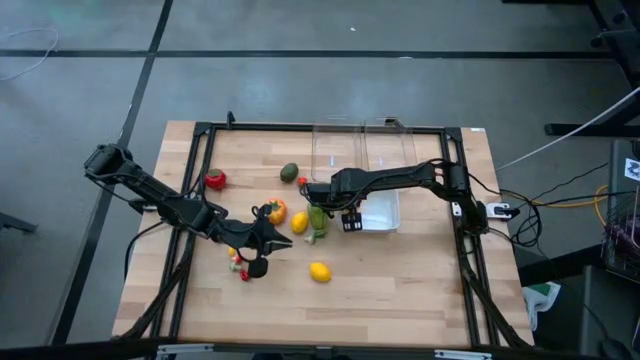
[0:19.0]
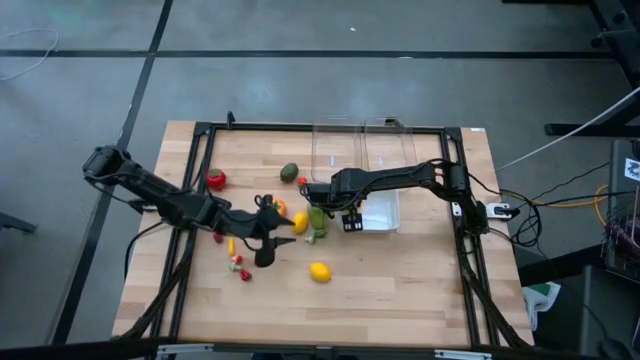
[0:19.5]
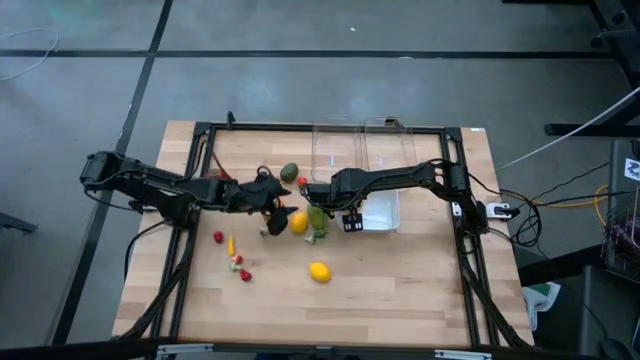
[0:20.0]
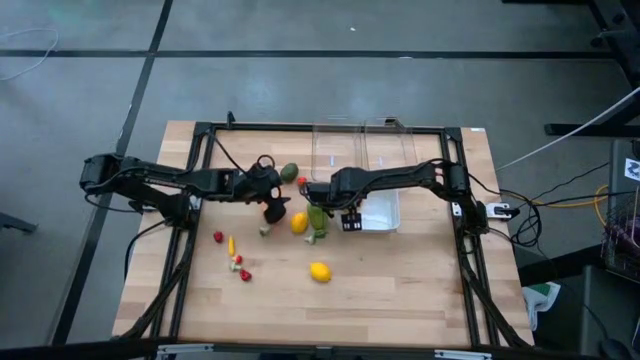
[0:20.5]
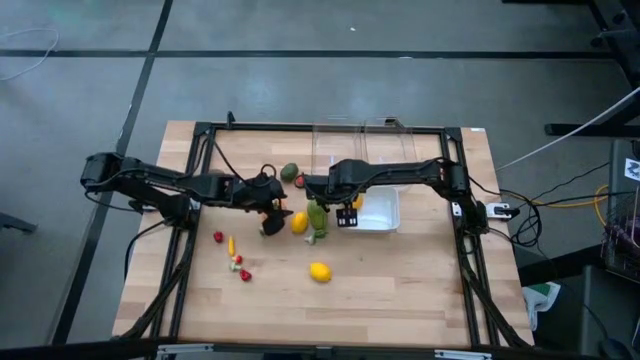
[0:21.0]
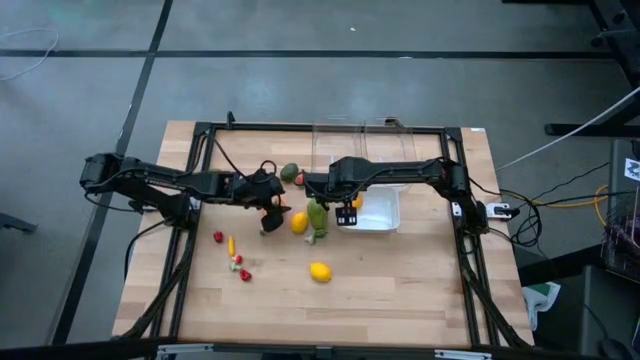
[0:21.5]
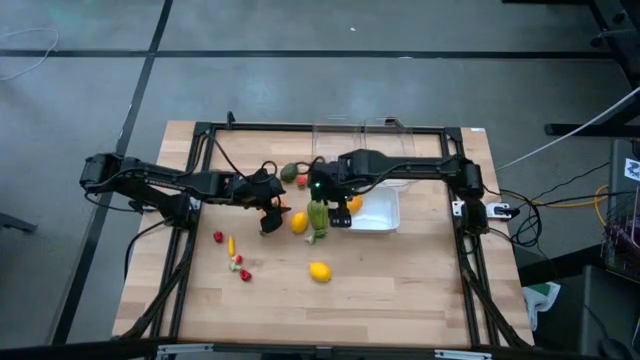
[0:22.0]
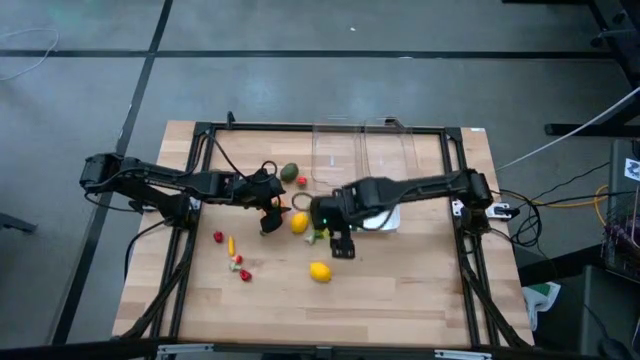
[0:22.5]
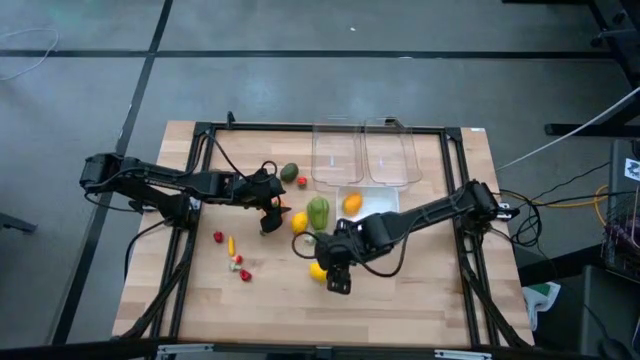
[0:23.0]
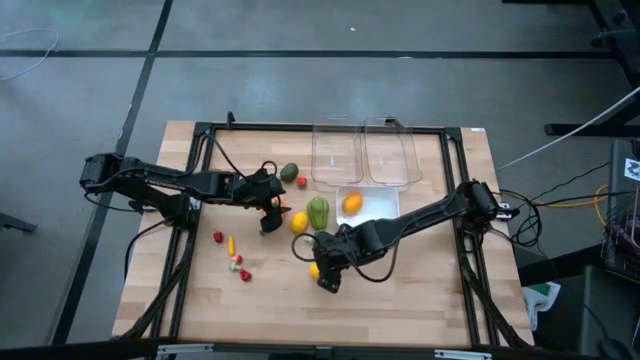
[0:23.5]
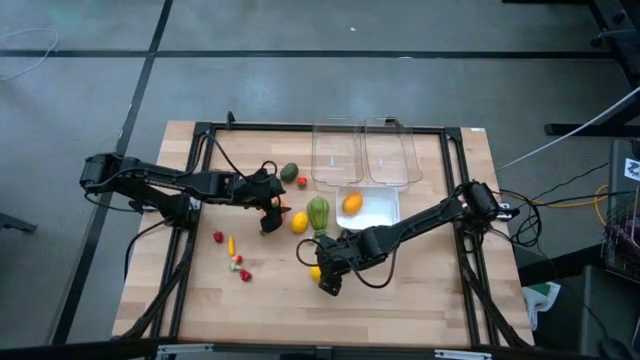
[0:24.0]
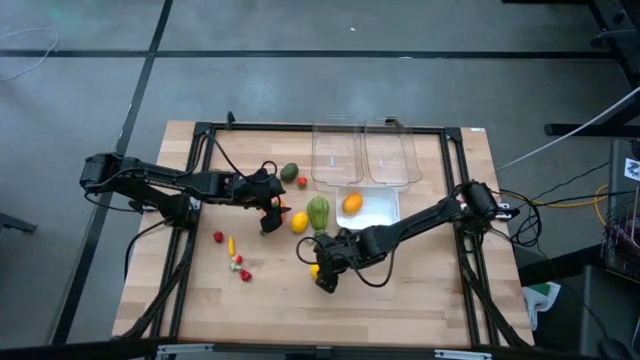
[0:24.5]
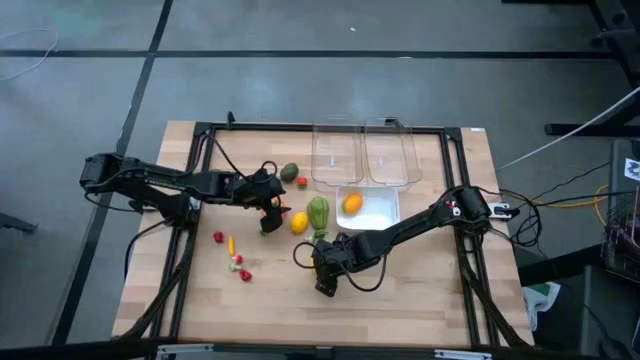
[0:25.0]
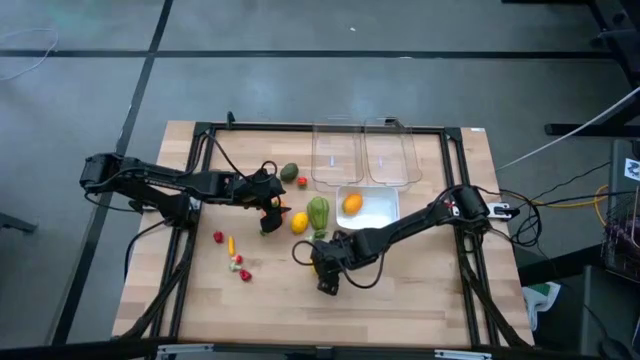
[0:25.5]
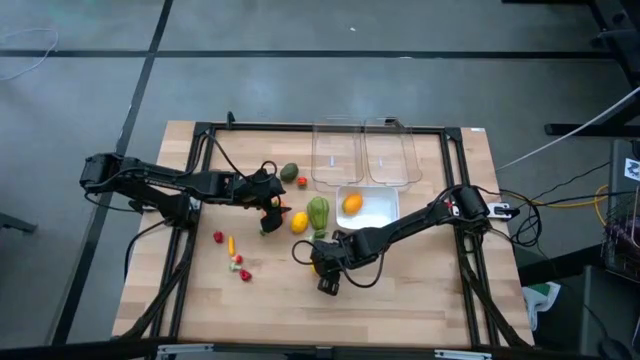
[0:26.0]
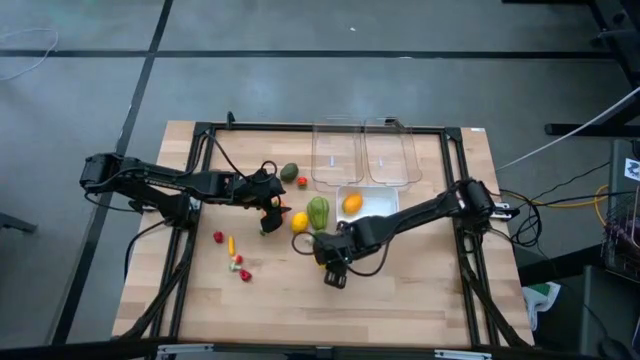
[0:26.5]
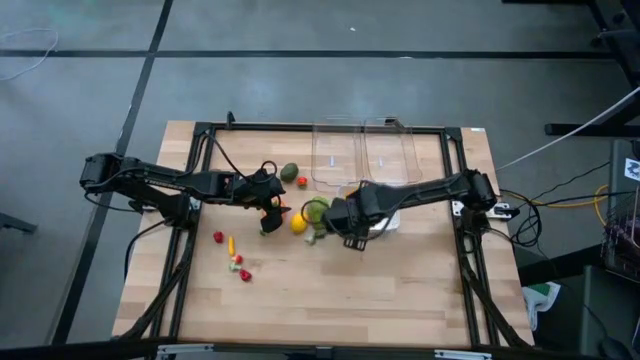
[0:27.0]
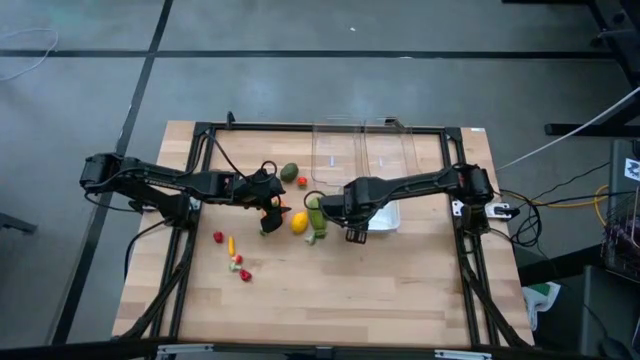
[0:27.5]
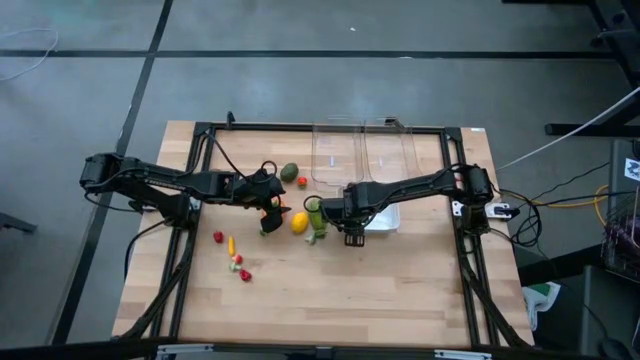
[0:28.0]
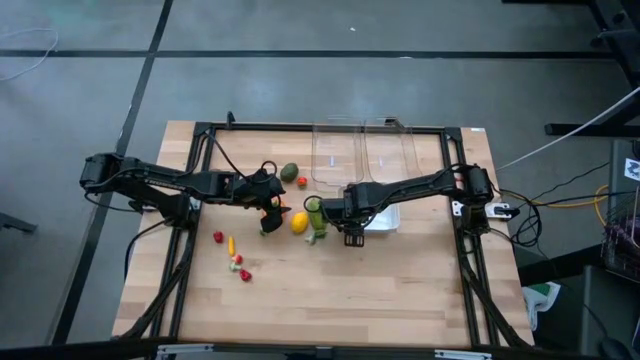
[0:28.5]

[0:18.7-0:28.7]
Task: Sort produce into baskets
Put the bottom lemon into the white bin

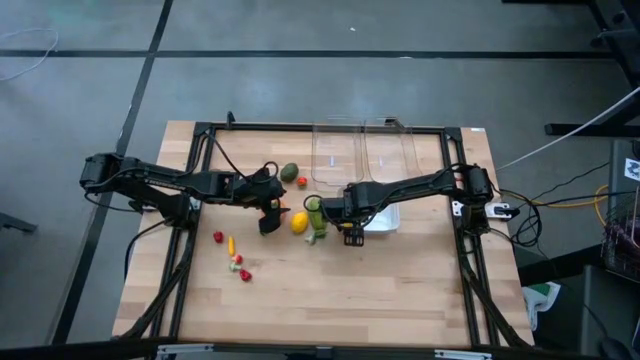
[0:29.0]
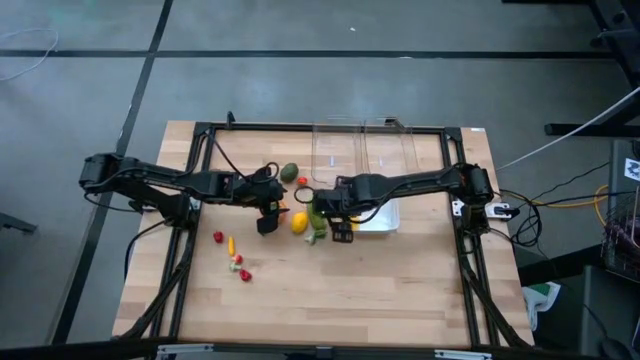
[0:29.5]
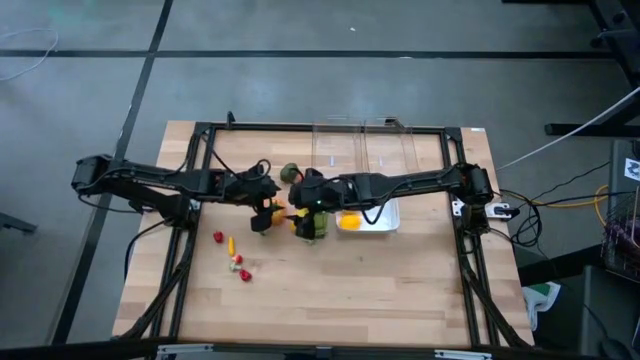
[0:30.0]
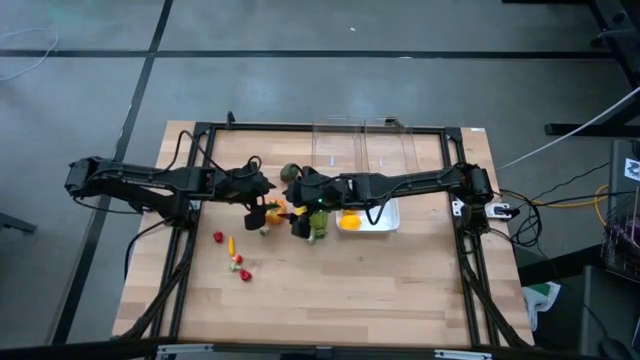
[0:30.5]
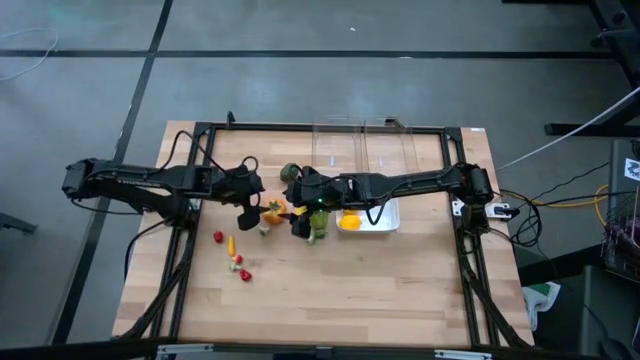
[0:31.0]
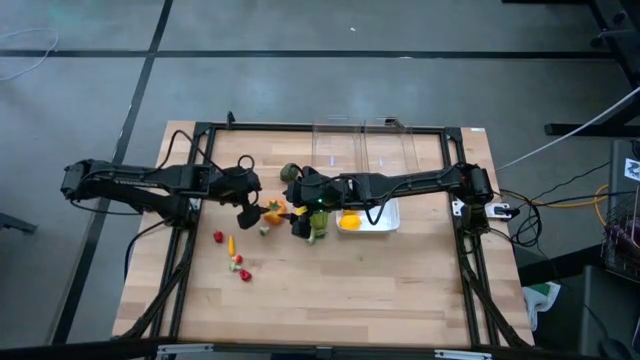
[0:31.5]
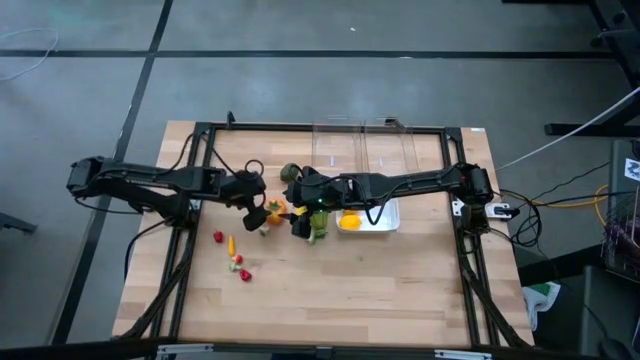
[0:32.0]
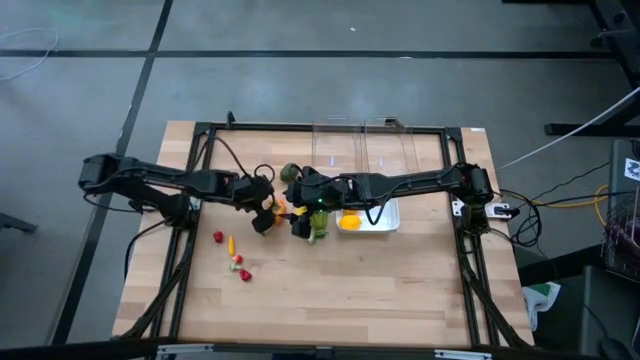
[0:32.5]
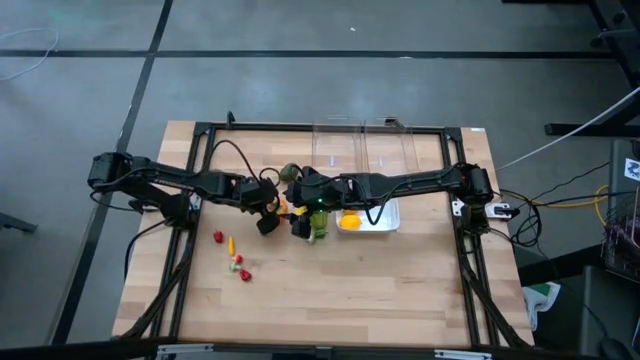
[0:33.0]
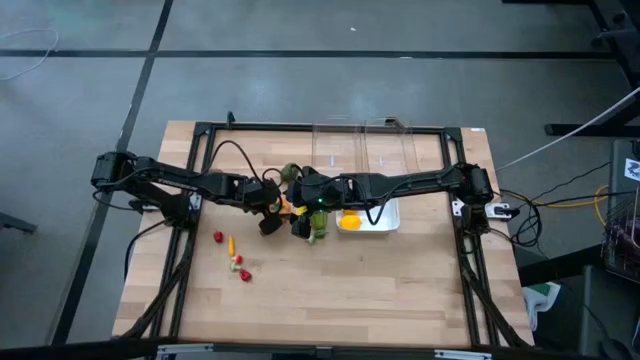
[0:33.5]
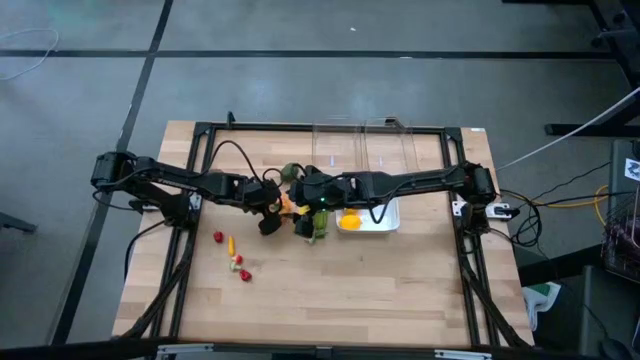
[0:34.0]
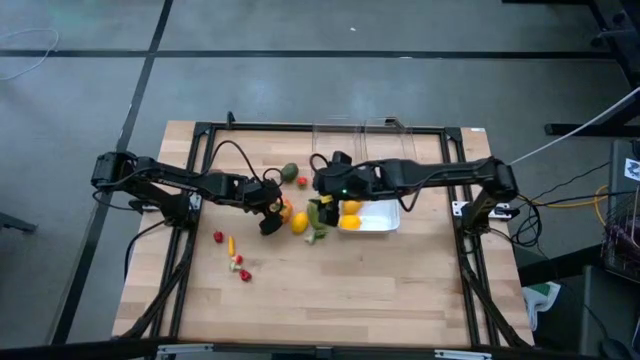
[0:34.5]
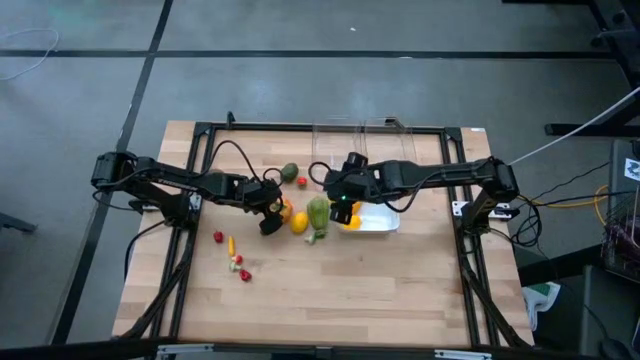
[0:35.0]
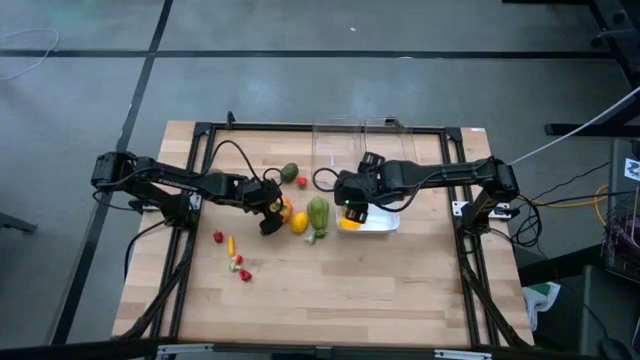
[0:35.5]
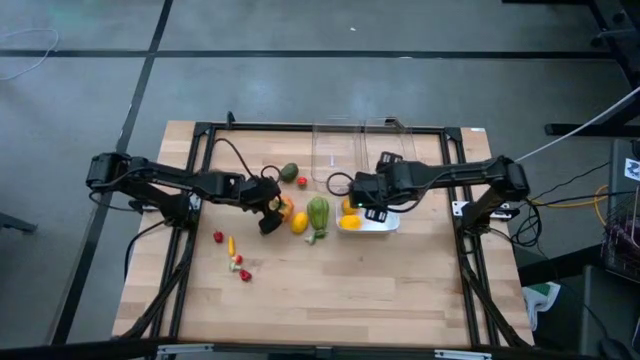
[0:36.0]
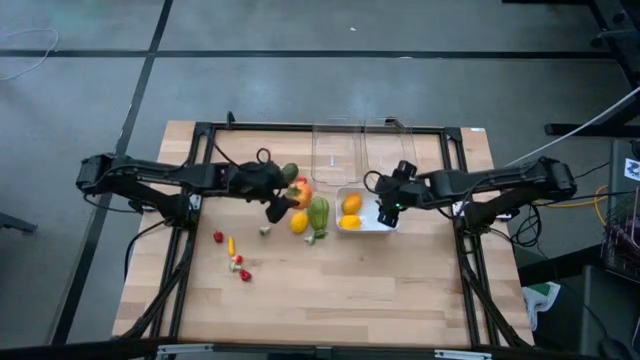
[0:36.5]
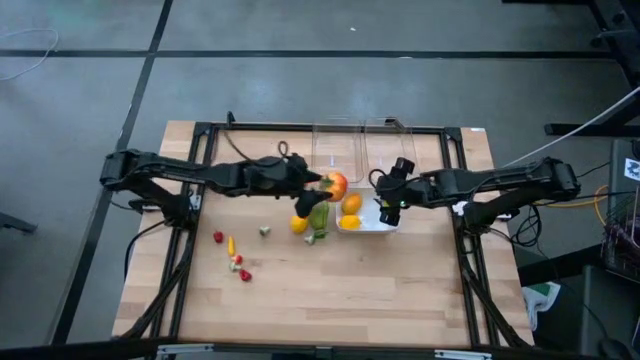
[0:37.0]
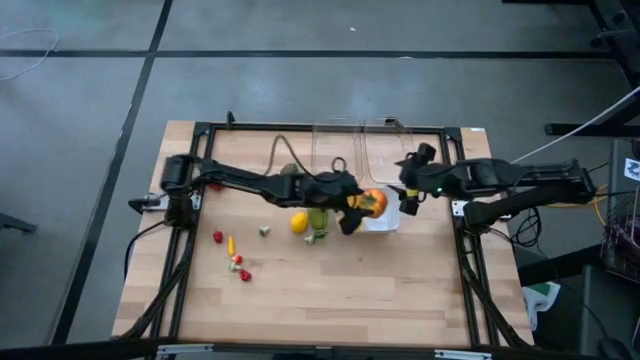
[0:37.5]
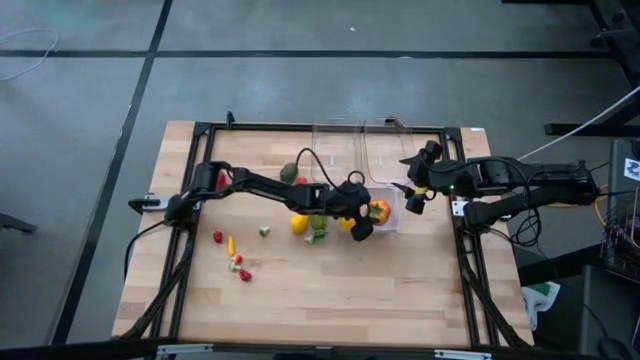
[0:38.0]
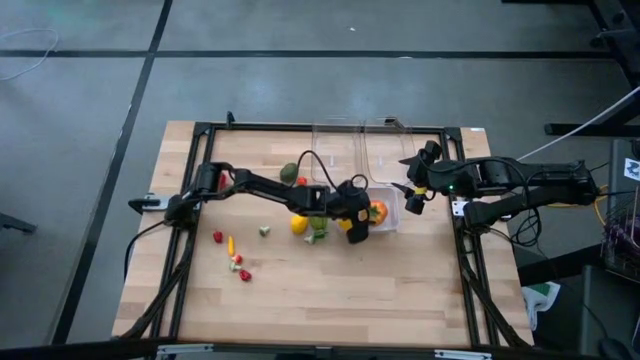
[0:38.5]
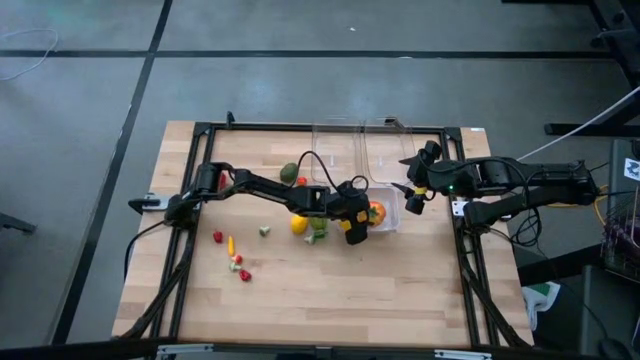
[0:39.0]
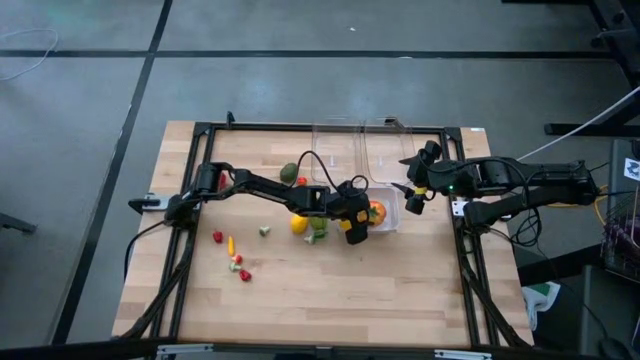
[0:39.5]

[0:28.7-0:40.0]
Put the big persimmon into the white bin
